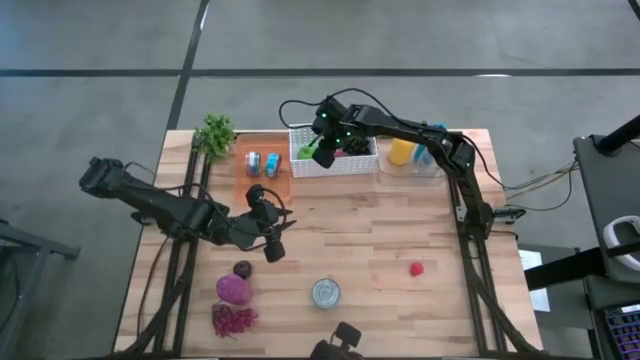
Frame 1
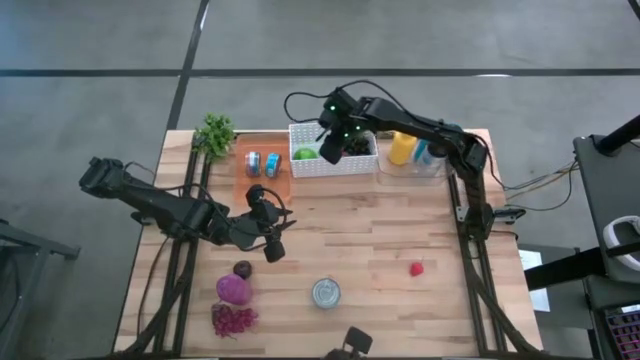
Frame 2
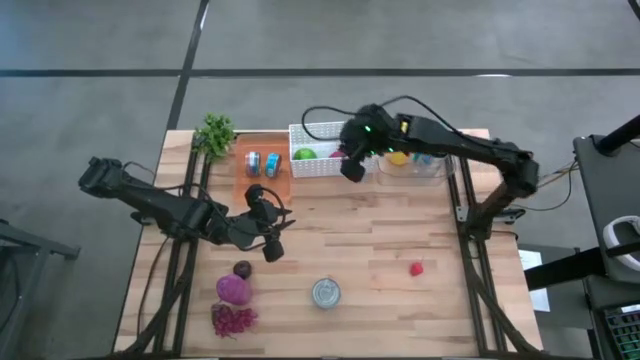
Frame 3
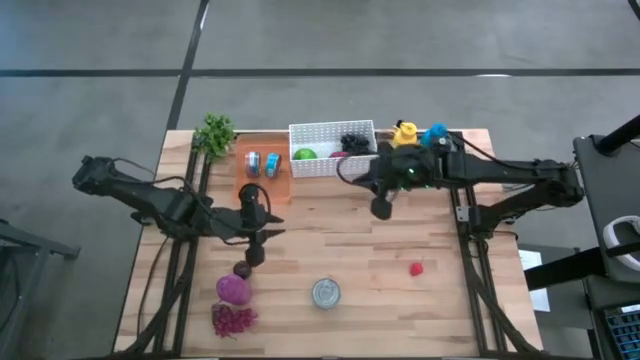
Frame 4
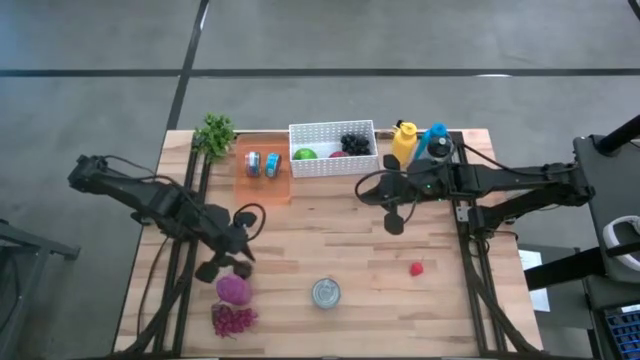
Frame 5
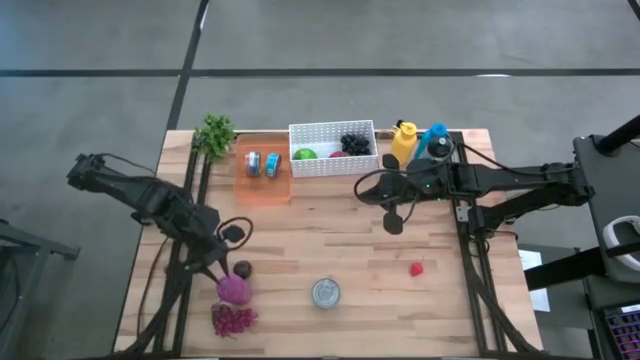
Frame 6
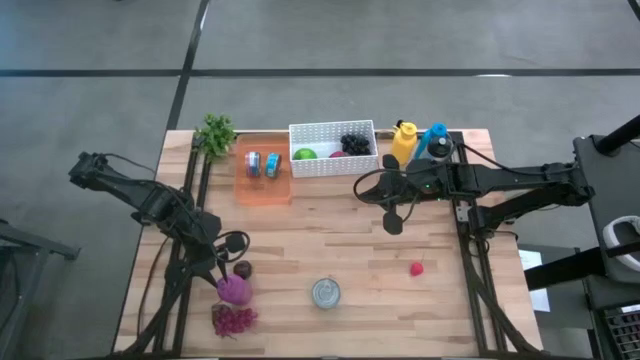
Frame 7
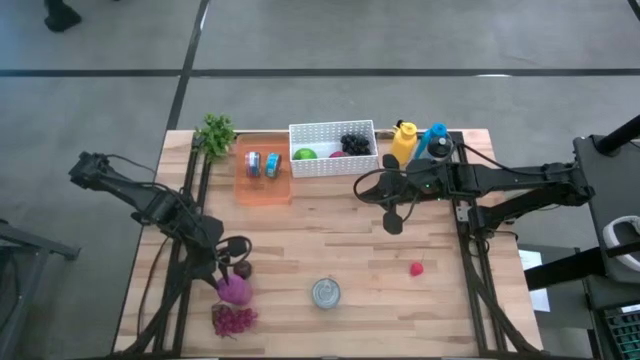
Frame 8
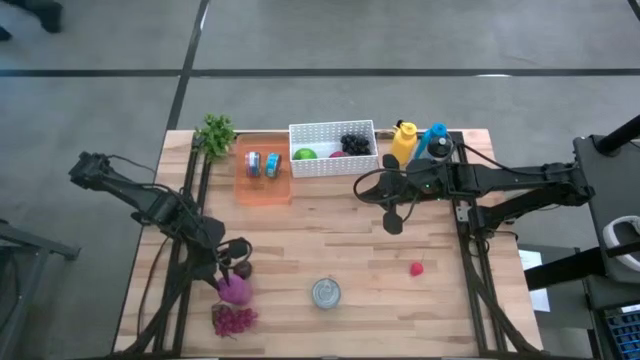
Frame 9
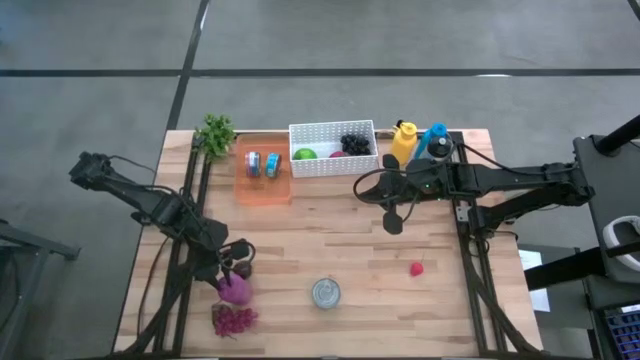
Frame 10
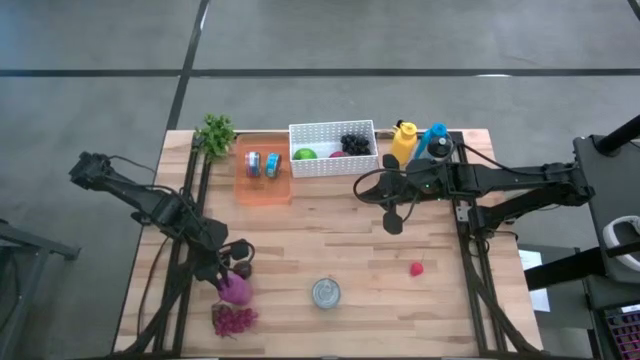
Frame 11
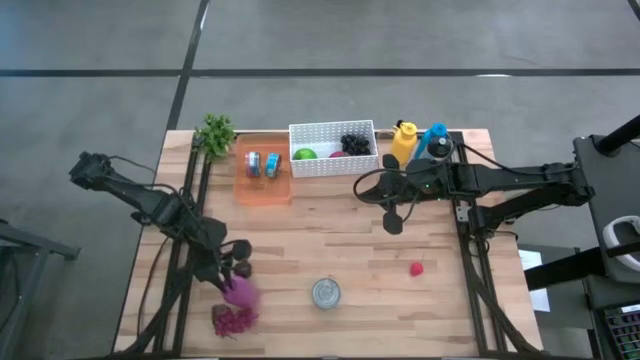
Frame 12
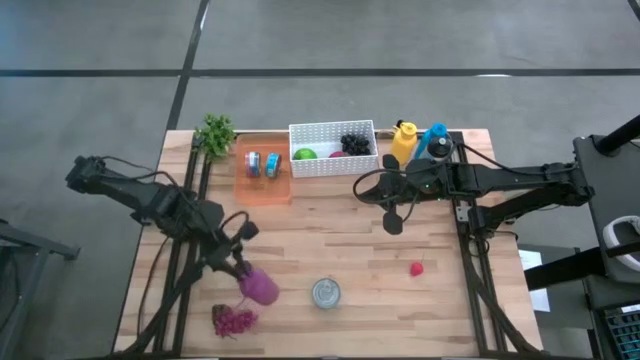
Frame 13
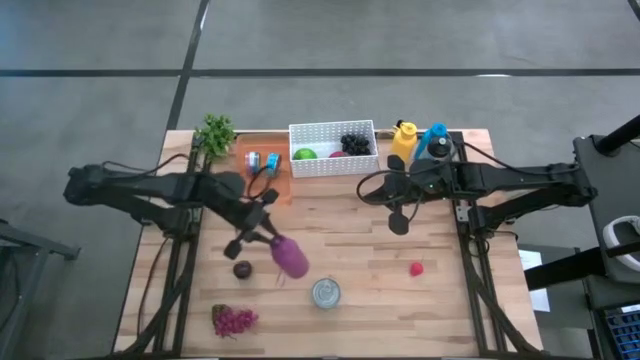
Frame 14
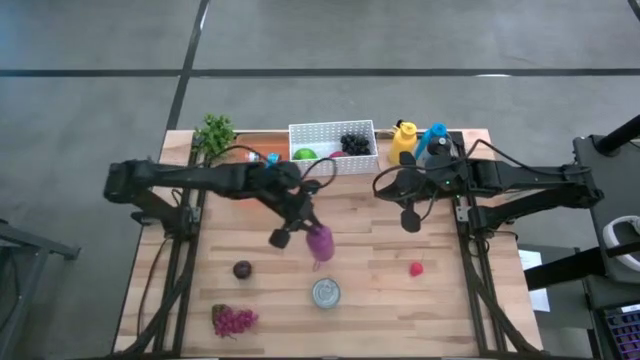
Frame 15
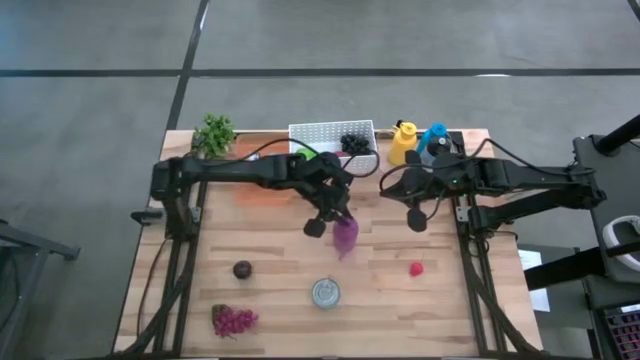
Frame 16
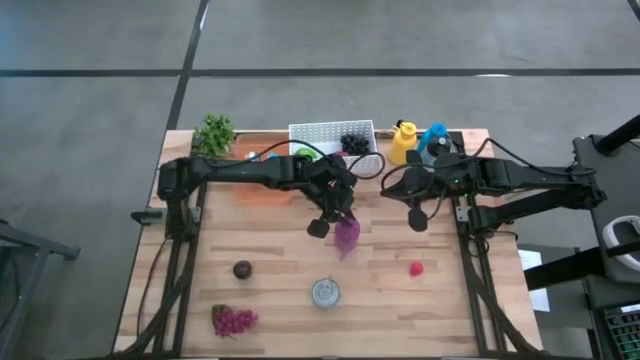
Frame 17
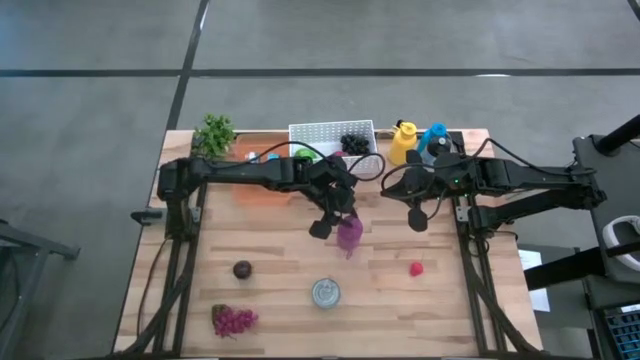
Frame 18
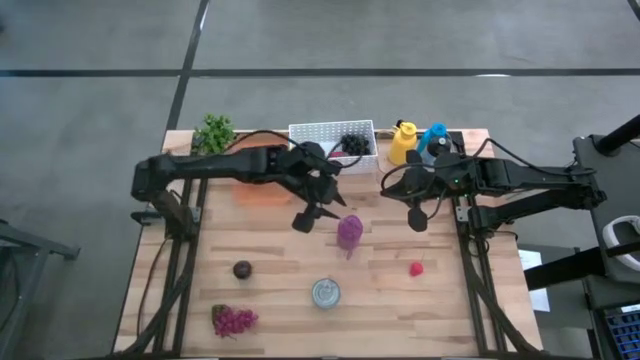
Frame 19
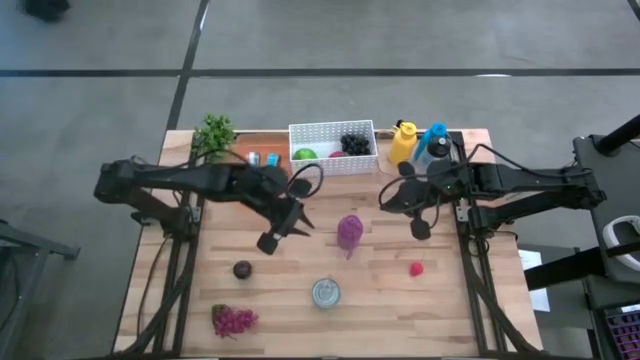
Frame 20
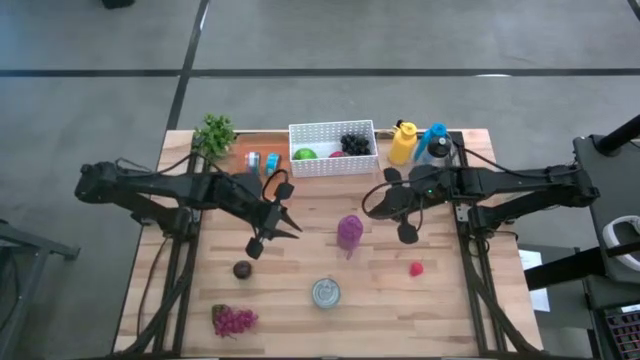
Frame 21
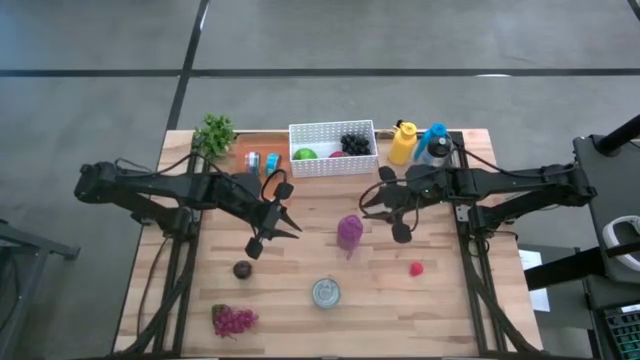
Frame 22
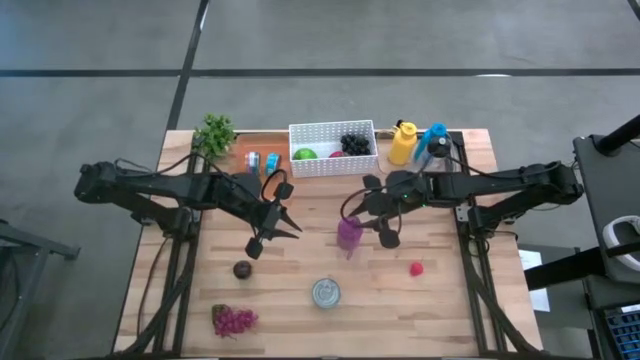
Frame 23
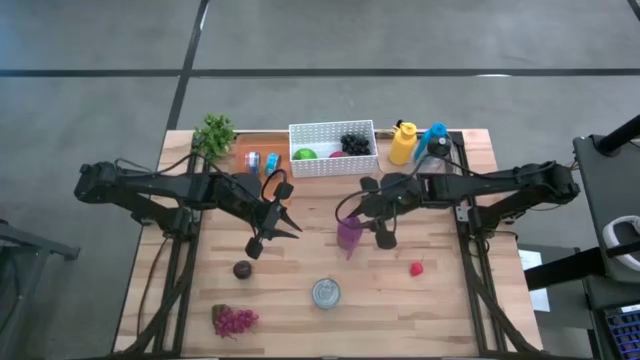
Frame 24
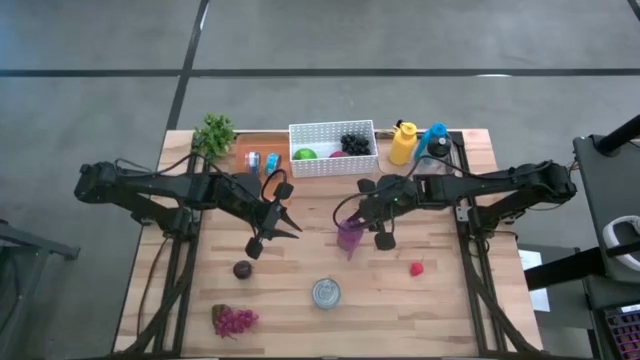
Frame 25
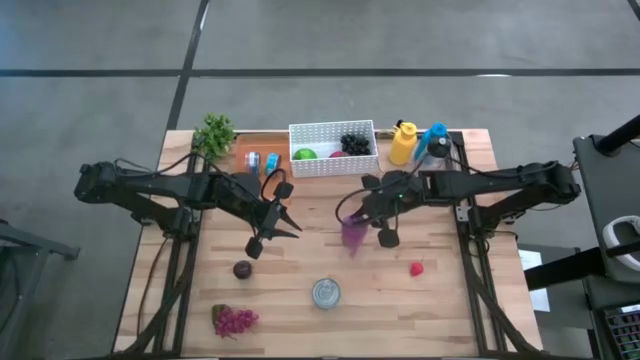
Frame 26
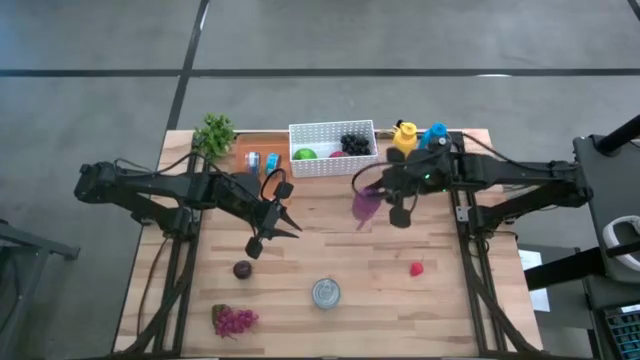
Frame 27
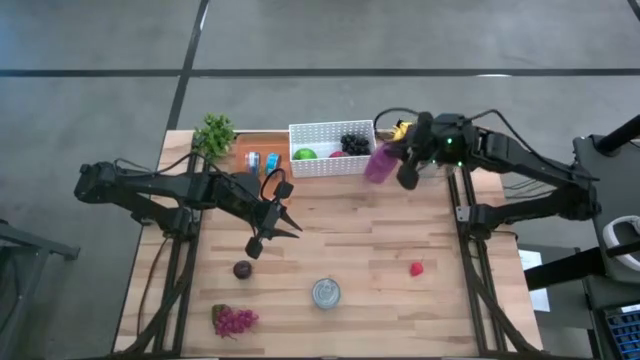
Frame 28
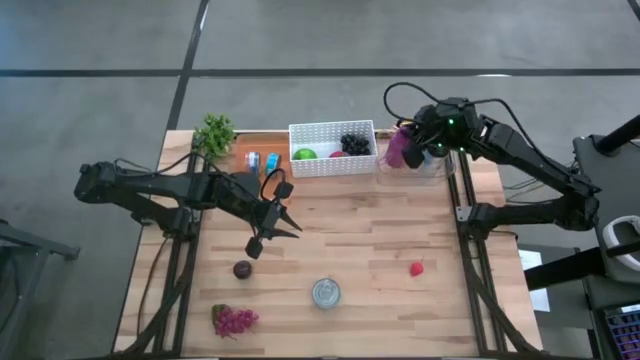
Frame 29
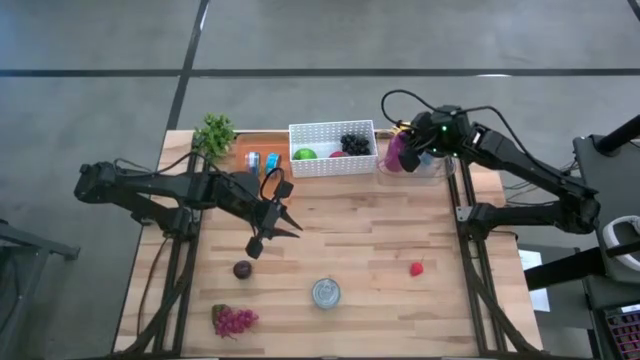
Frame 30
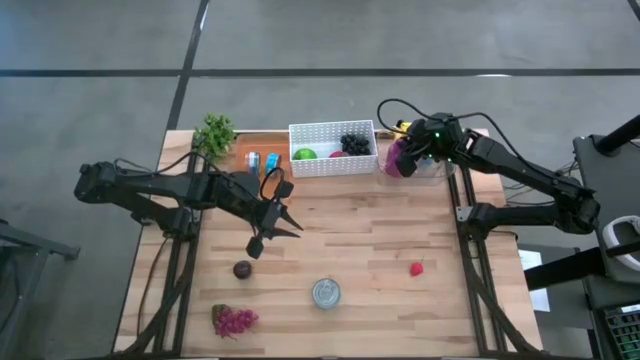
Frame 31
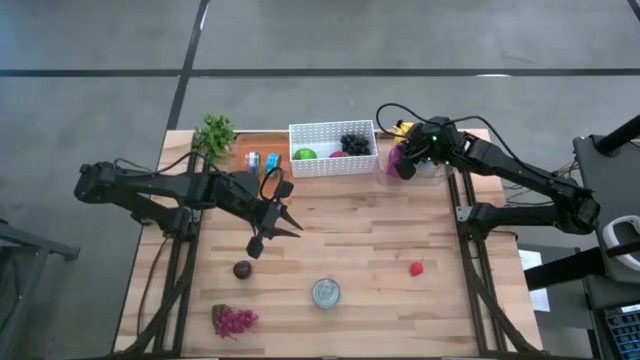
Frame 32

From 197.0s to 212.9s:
Task: Pick & Place Food Item
Put the purple water bottle into the transparent bin

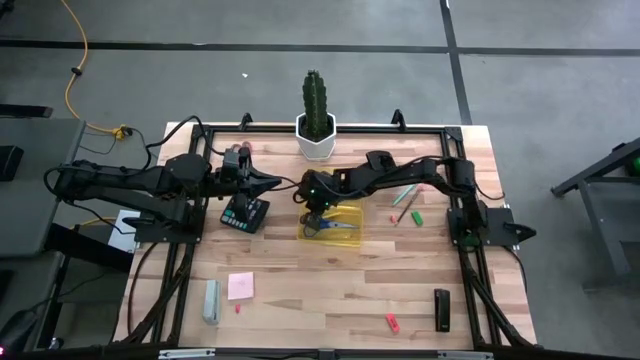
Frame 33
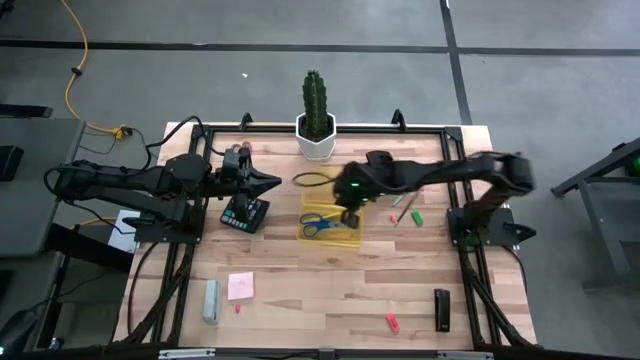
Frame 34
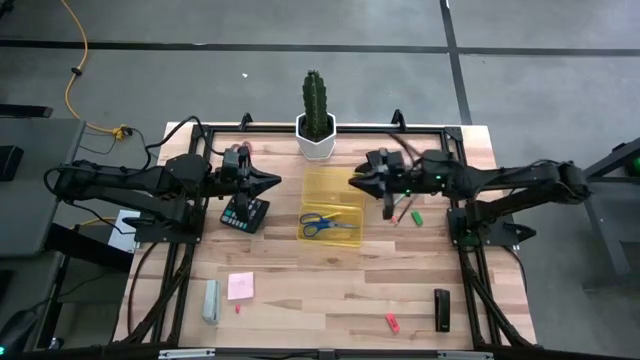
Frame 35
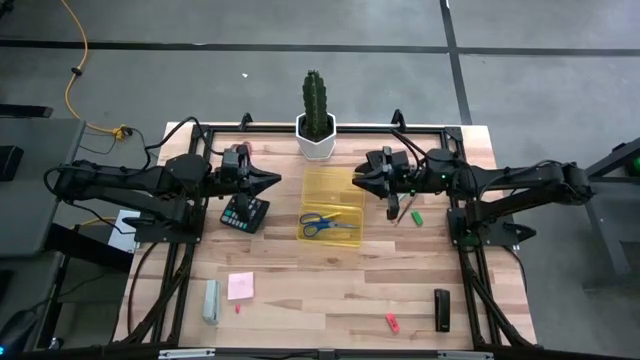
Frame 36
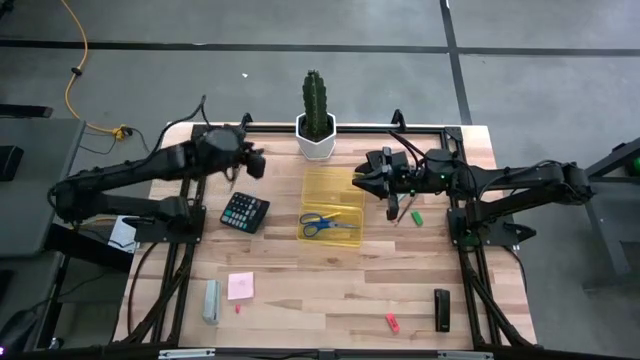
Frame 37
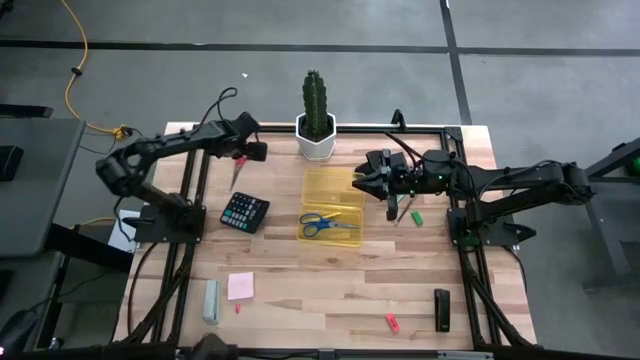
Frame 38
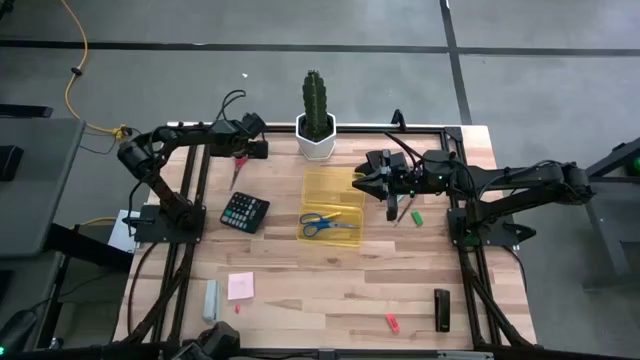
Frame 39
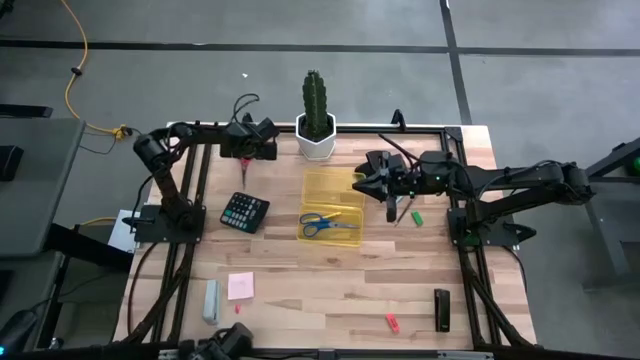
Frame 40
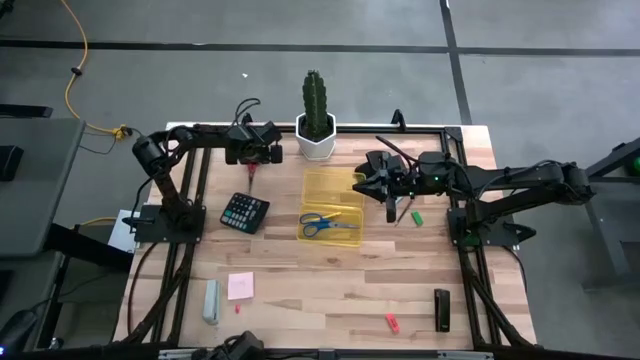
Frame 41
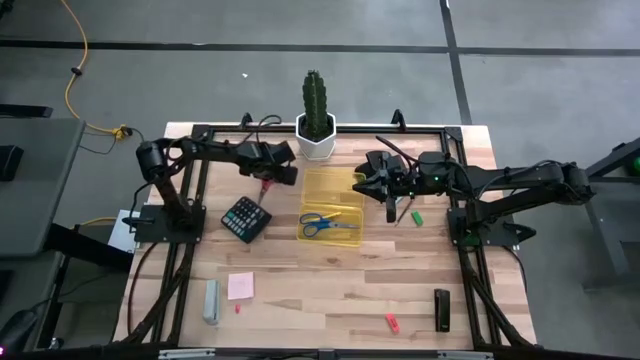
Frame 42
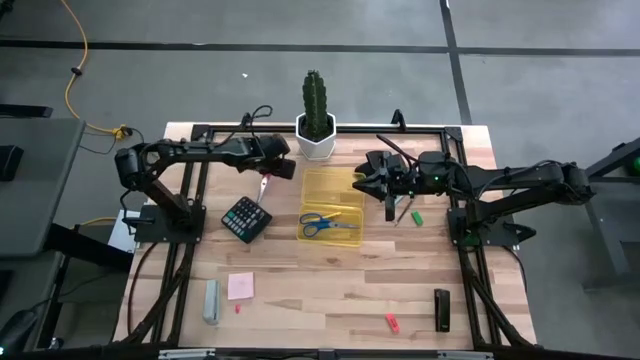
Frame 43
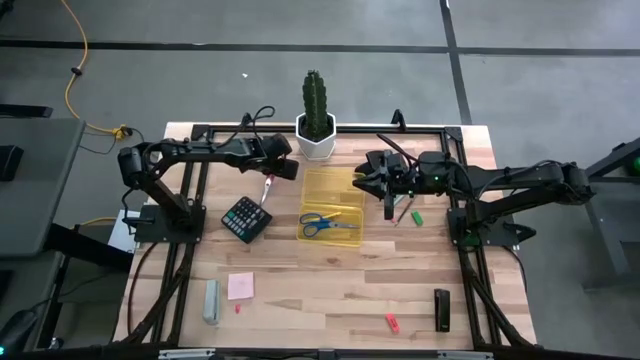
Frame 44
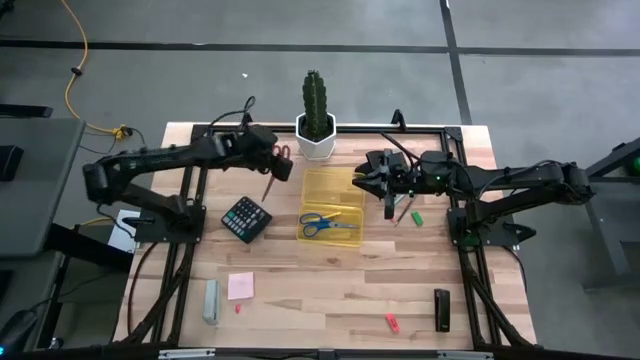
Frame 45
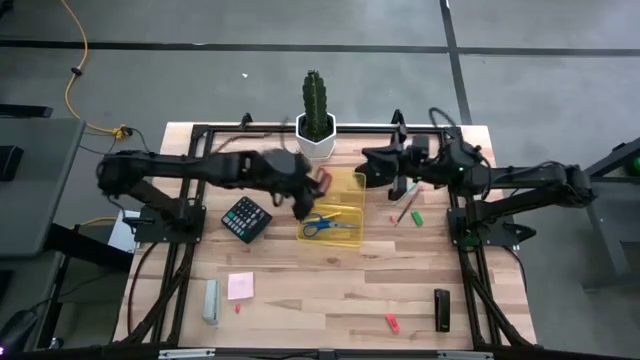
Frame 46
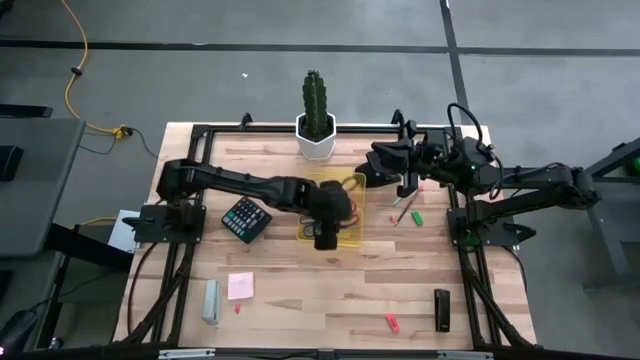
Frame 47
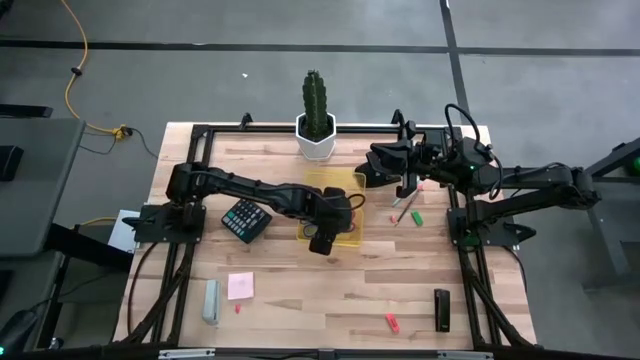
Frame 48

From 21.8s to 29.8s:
Task: Pack school essentials
Put the red scissors into the supply box
